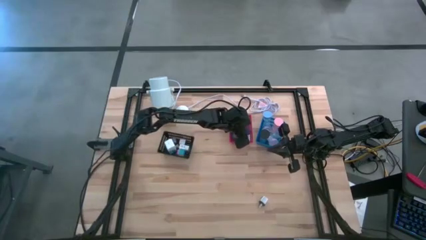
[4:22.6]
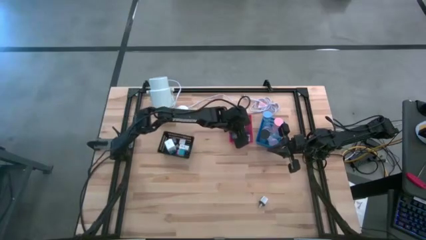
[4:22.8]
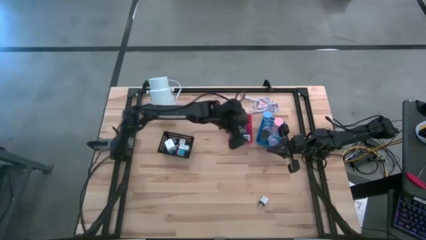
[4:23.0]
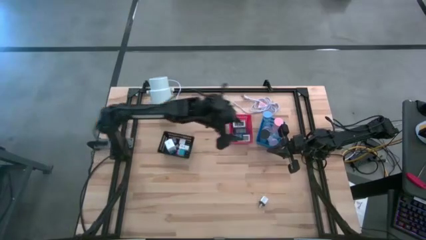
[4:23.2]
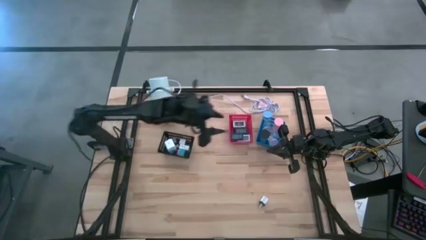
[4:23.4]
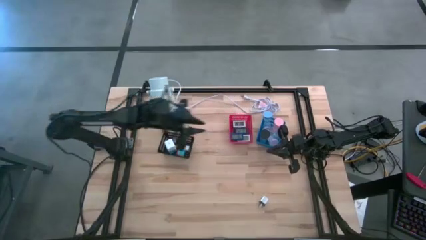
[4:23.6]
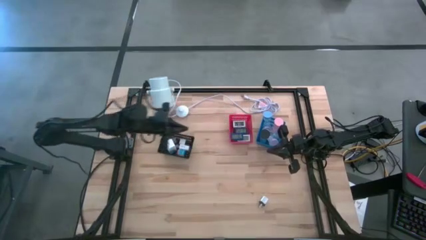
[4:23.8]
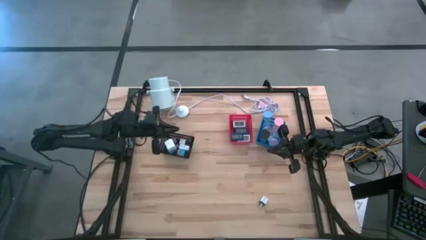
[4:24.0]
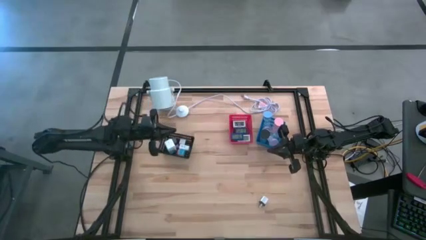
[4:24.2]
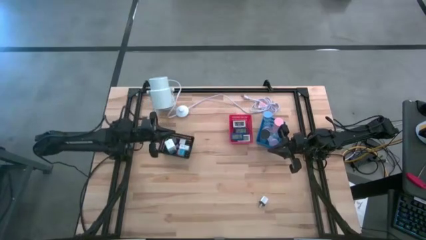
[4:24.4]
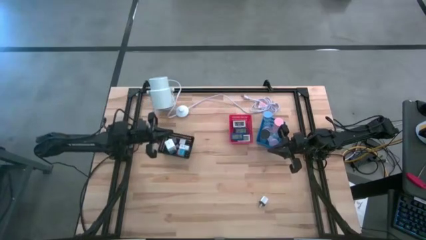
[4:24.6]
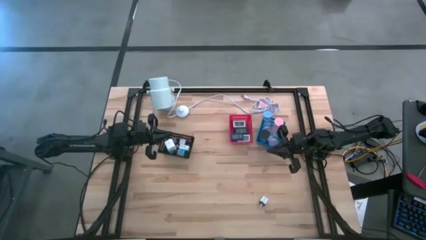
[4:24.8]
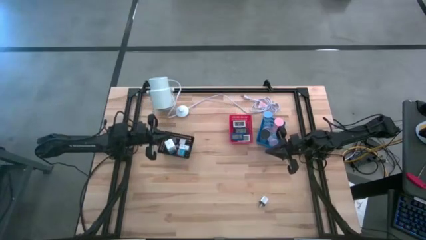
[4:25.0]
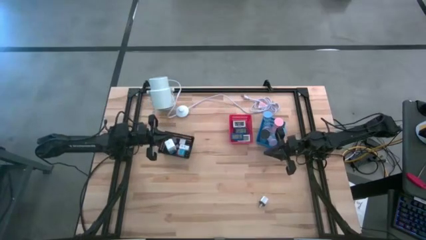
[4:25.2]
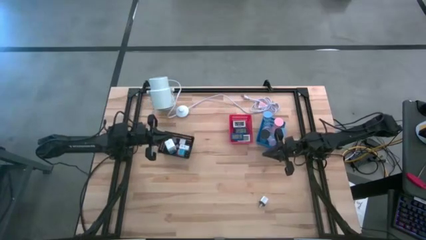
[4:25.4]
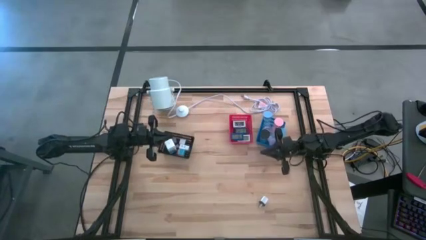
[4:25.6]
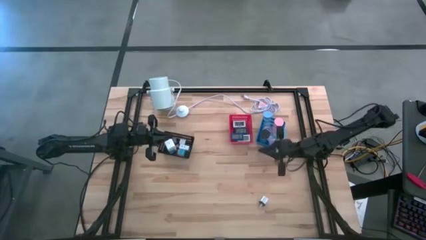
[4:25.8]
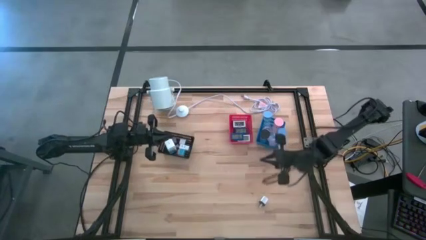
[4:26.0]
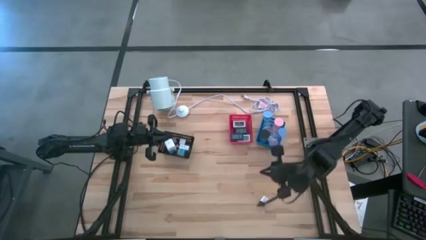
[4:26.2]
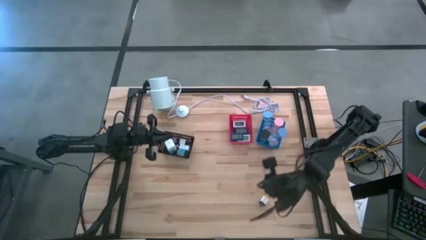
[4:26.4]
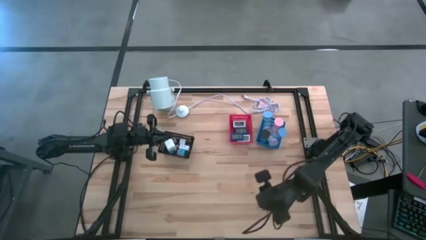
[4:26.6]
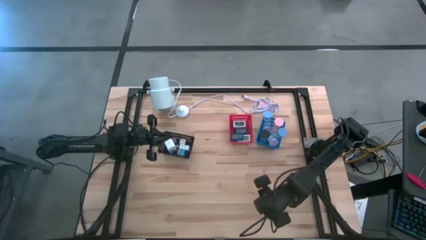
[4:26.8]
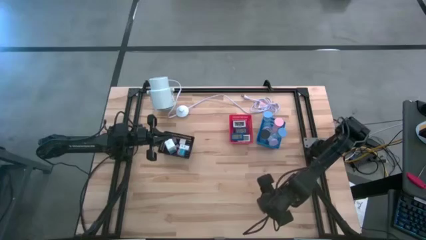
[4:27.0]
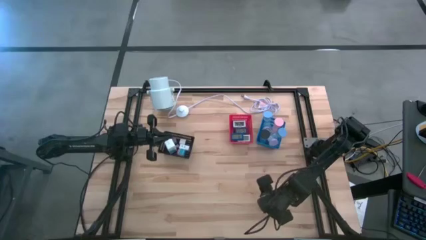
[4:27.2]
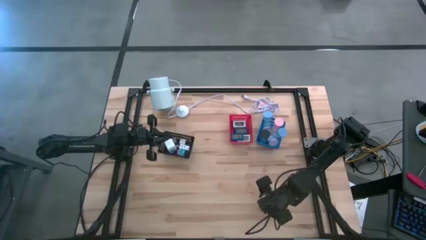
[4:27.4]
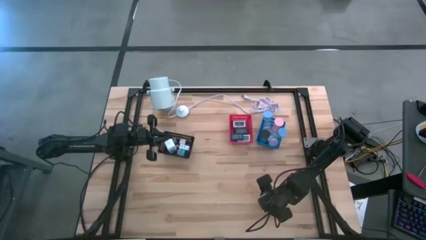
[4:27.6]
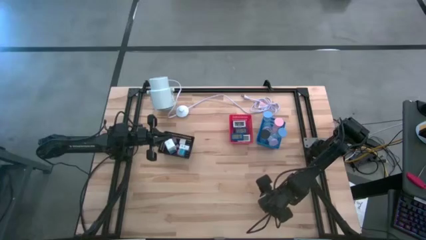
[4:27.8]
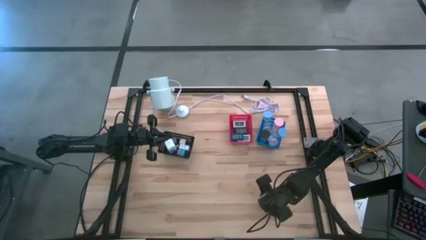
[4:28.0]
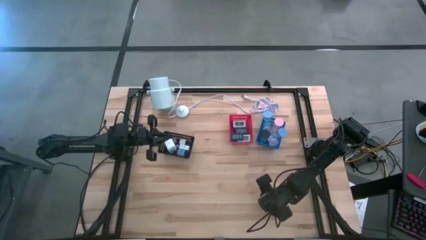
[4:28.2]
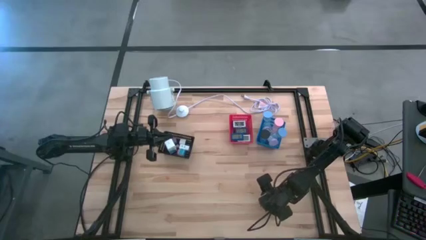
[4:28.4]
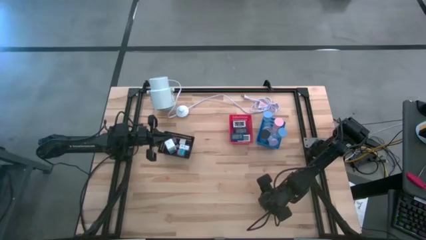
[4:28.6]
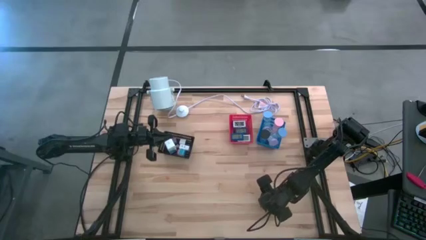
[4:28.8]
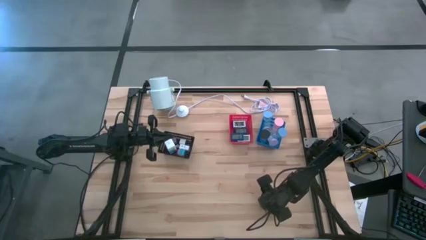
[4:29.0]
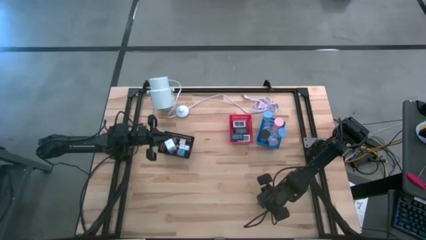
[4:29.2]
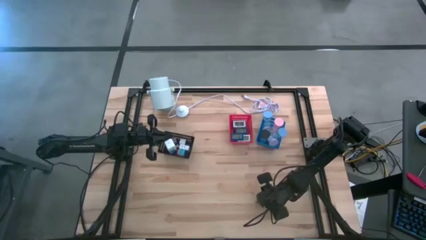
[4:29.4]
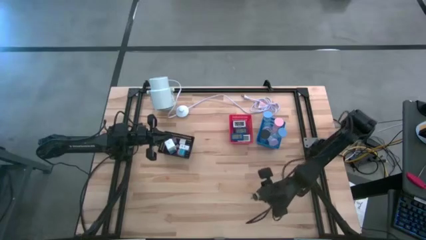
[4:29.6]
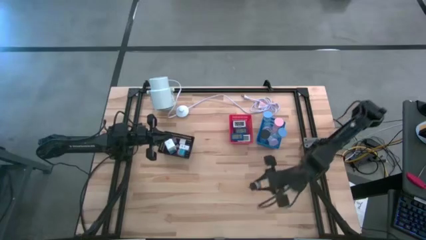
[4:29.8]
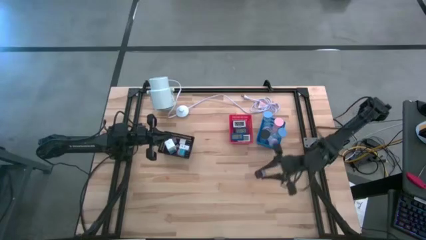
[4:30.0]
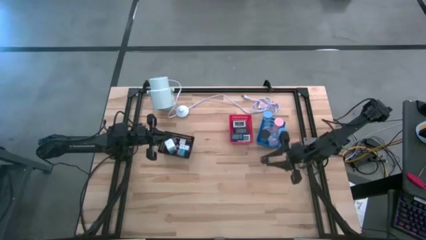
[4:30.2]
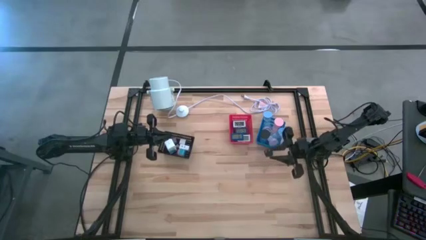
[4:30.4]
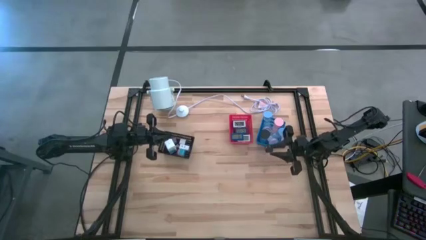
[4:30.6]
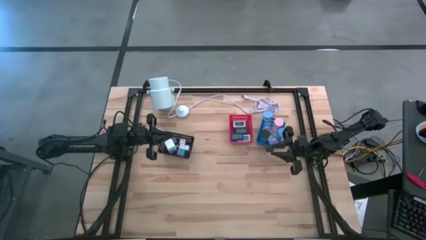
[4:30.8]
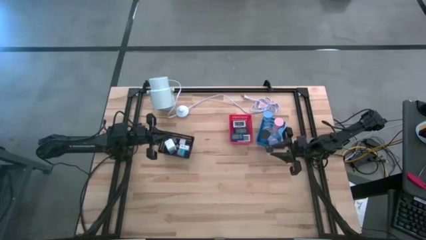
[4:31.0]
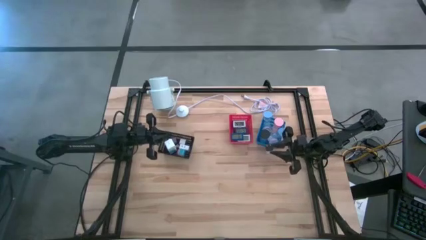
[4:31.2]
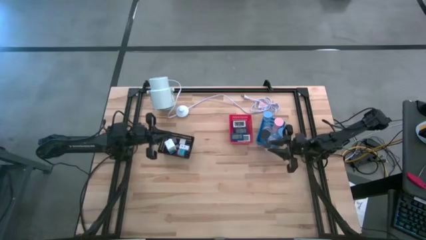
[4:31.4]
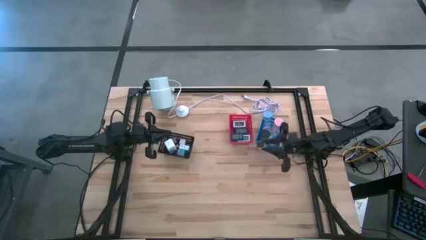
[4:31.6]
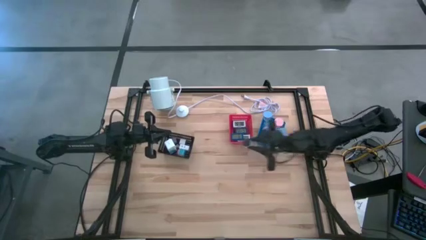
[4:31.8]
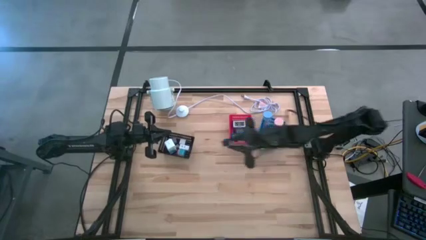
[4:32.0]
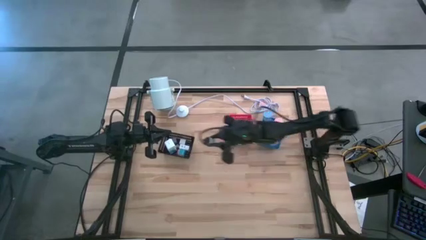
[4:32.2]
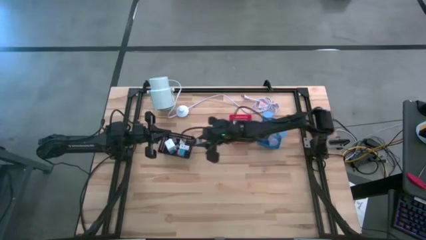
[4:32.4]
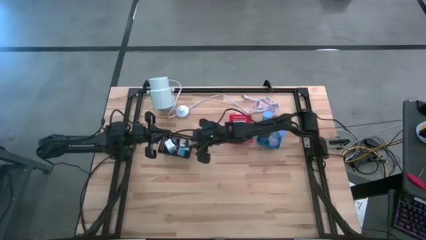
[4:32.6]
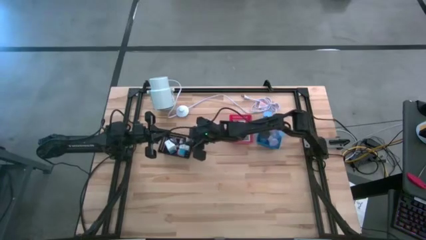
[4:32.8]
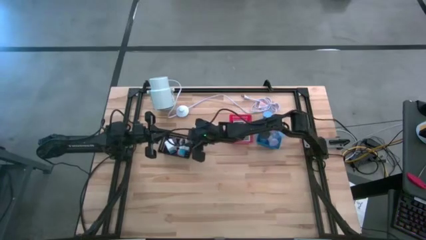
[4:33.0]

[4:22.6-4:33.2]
Task: Pick & Place Office items
Put the black white digital clock into the black bin

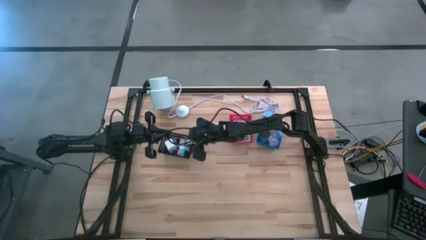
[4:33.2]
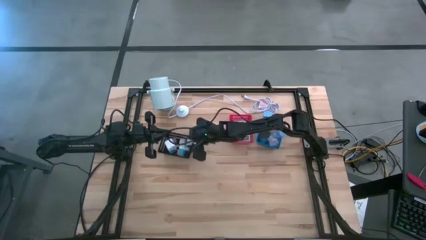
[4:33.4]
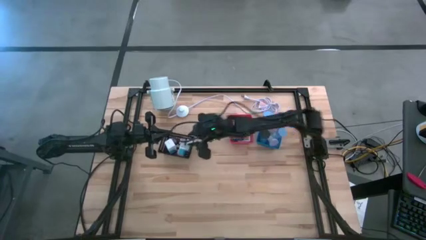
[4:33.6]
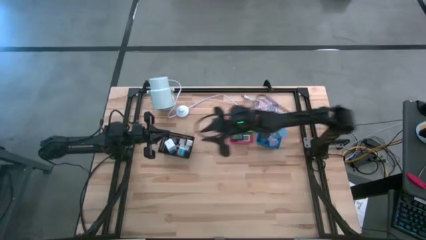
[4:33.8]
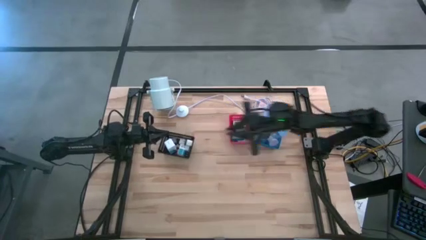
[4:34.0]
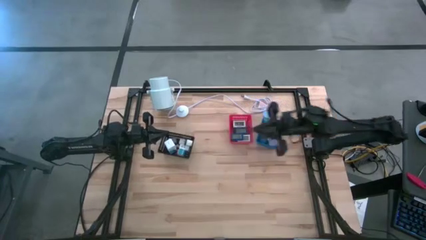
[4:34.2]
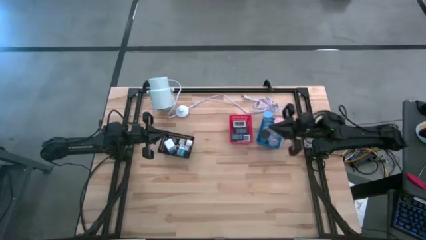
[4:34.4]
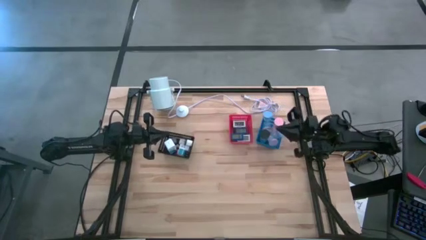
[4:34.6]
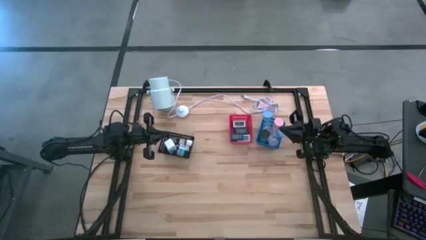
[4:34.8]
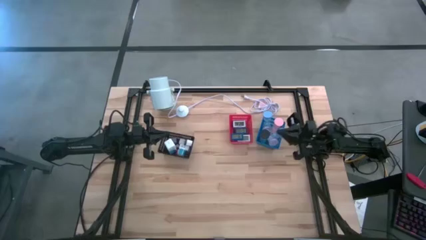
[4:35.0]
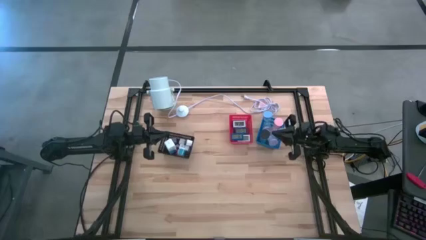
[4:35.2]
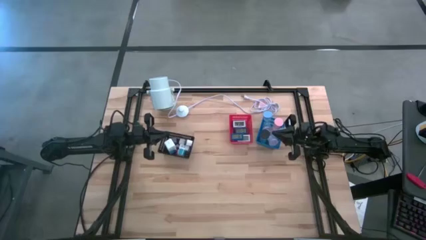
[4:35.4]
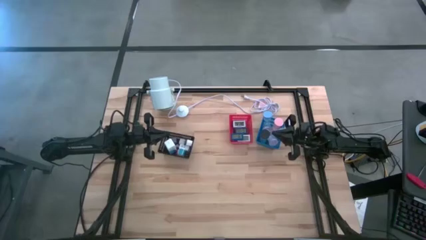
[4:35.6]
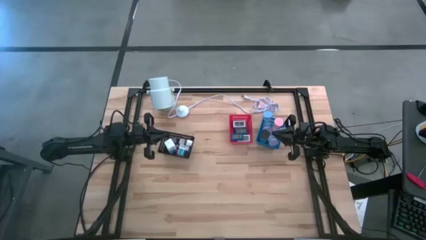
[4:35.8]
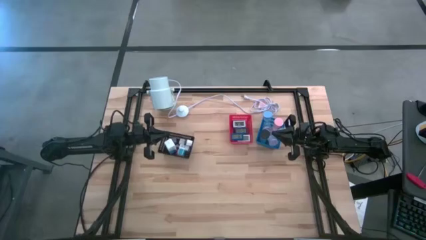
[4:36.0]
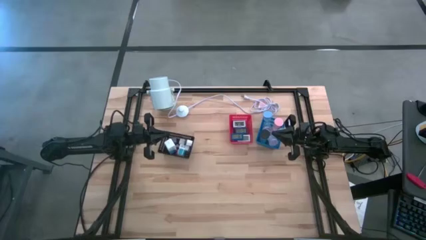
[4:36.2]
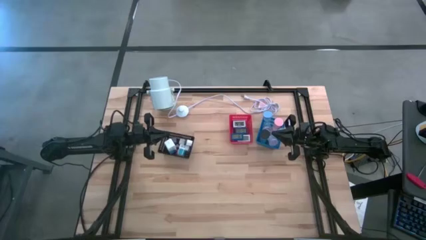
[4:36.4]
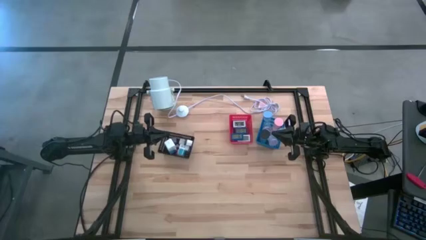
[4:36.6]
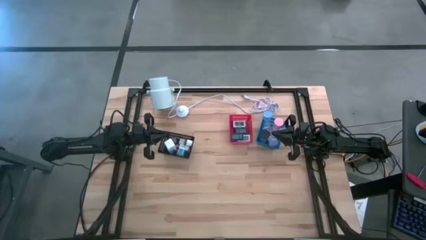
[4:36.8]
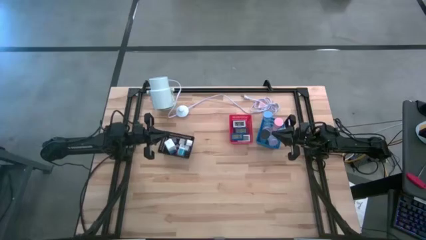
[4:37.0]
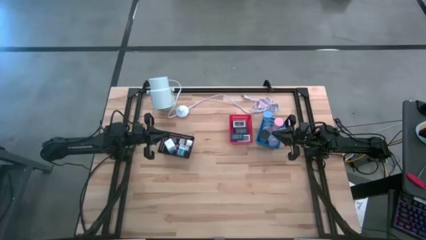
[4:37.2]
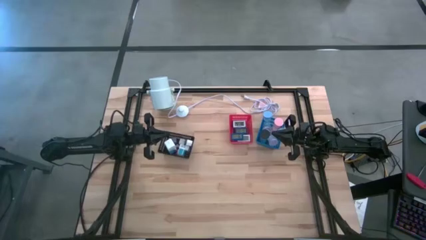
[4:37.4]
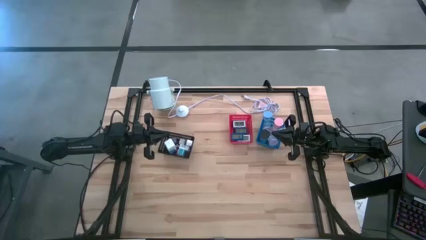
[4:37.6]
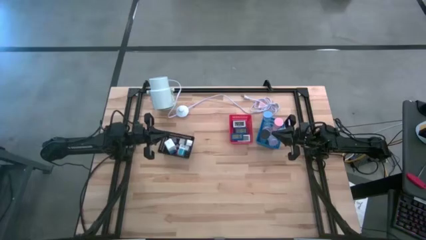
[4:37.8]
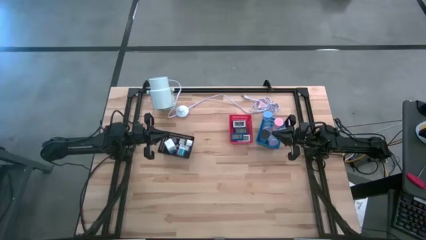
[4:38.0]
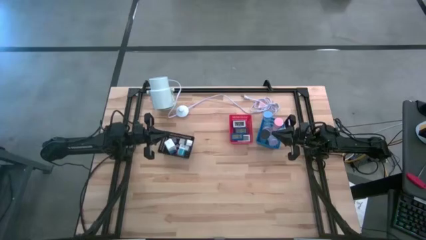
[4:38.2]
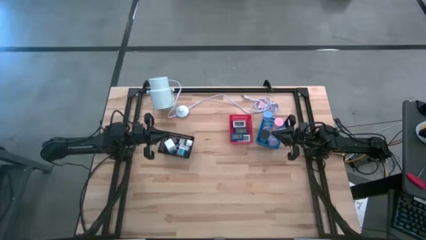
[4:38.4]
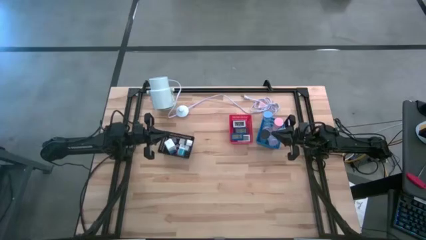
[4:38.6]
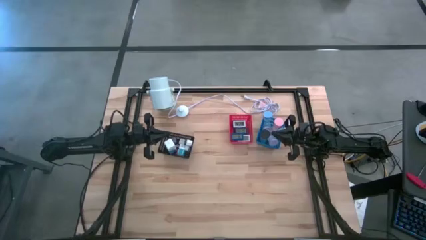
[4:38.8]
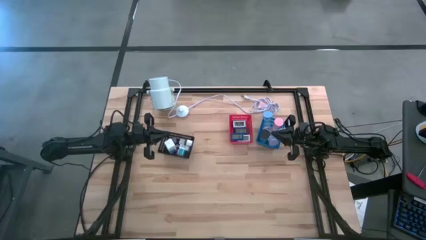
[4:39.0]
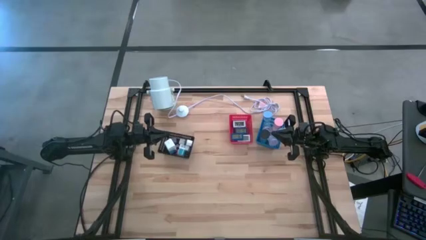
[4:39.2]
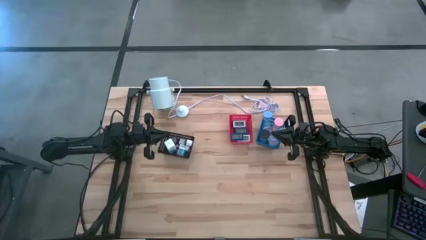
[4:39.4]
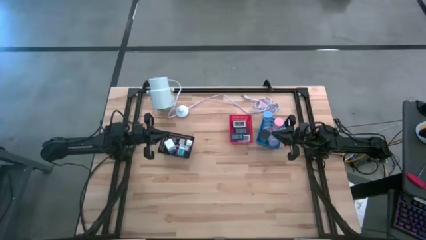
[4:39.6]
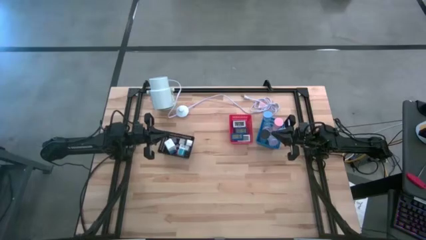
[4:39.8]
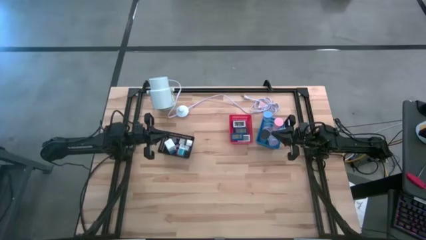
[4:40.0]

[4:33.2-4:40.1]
Return to Home Position
